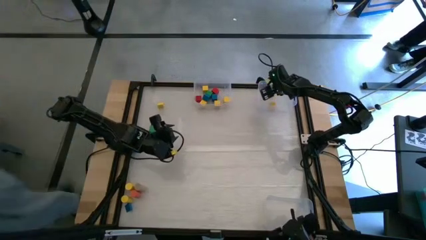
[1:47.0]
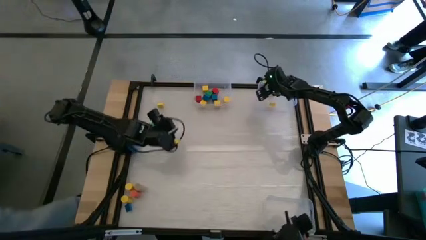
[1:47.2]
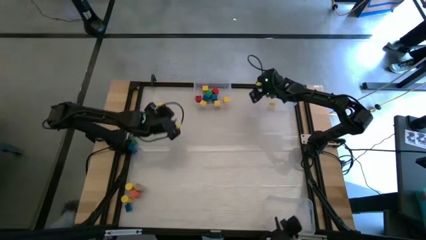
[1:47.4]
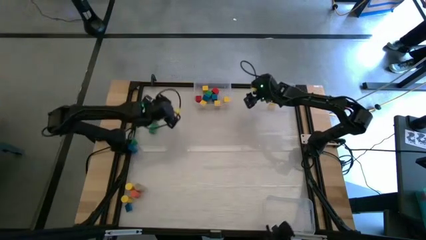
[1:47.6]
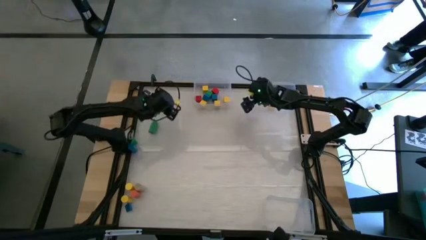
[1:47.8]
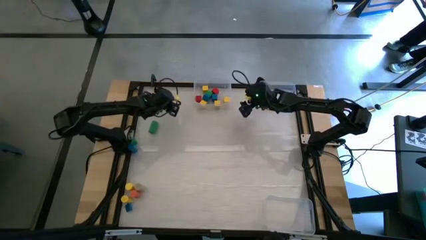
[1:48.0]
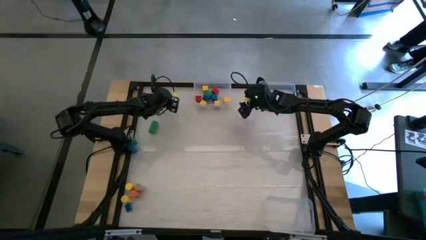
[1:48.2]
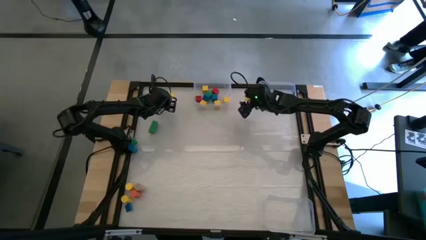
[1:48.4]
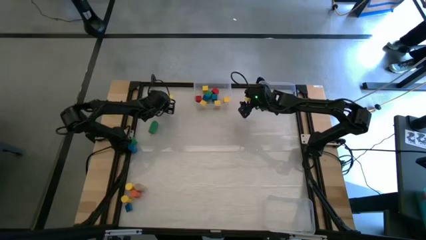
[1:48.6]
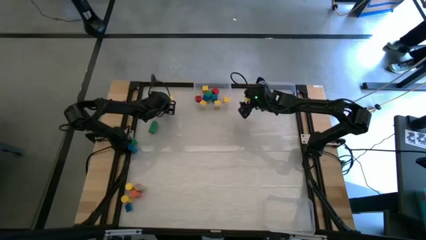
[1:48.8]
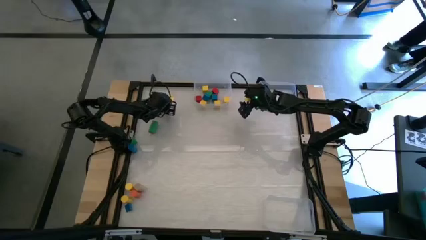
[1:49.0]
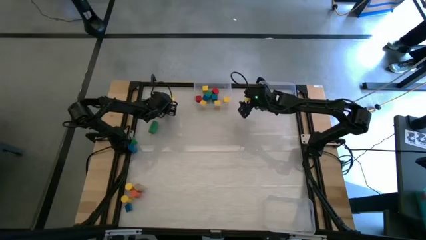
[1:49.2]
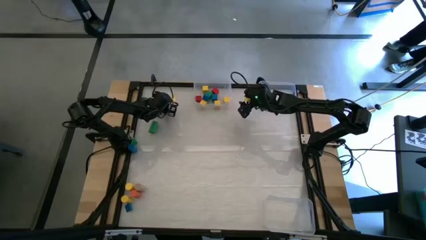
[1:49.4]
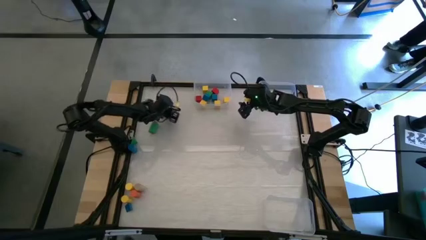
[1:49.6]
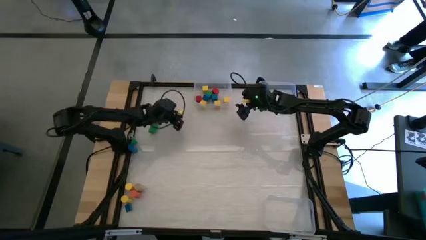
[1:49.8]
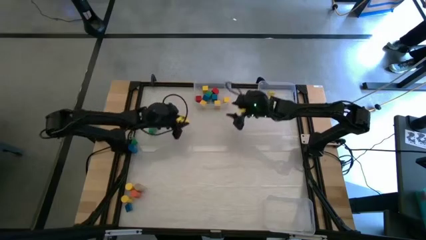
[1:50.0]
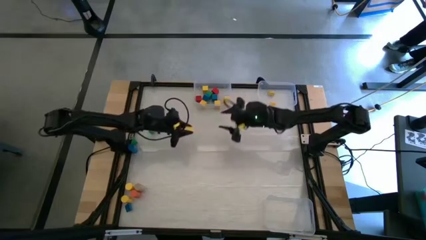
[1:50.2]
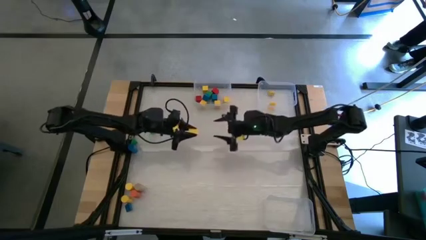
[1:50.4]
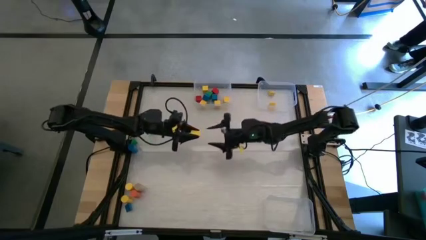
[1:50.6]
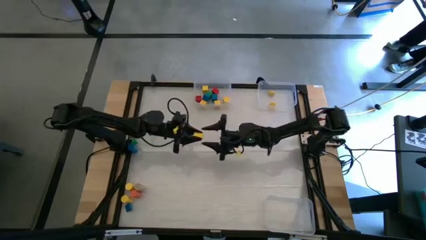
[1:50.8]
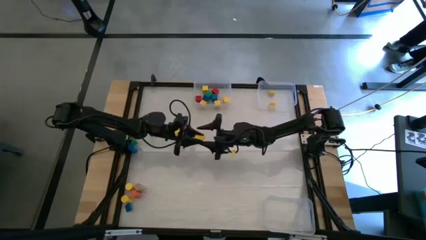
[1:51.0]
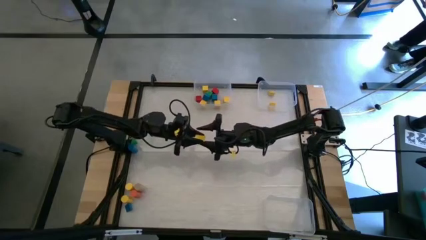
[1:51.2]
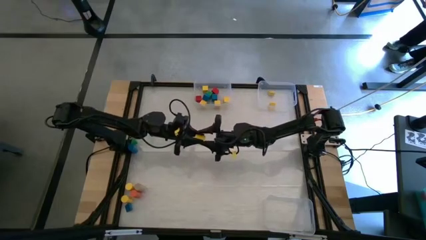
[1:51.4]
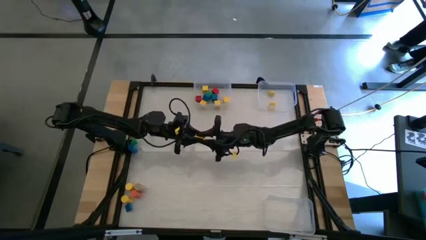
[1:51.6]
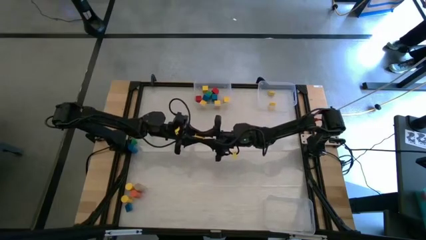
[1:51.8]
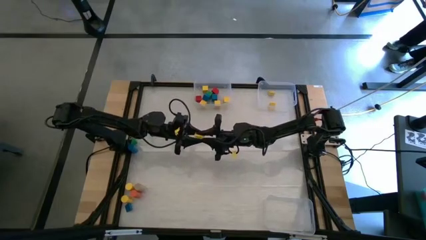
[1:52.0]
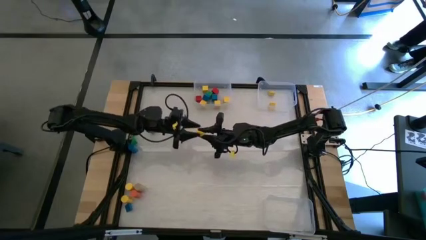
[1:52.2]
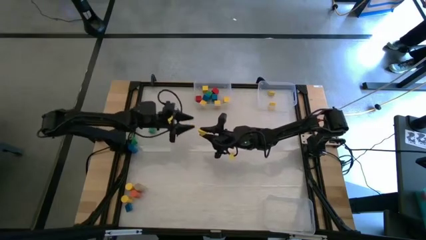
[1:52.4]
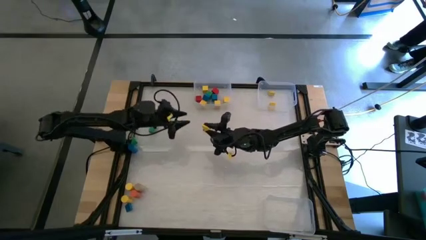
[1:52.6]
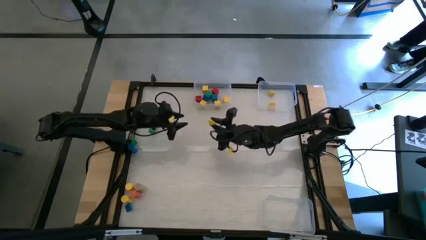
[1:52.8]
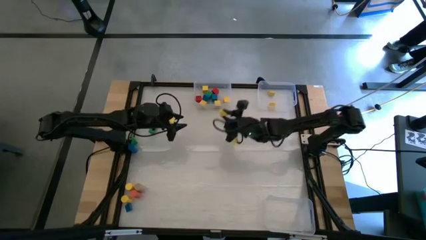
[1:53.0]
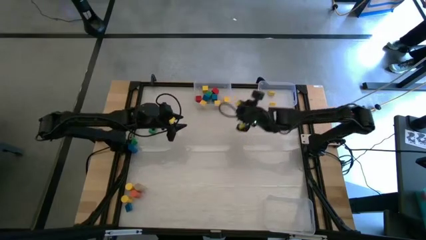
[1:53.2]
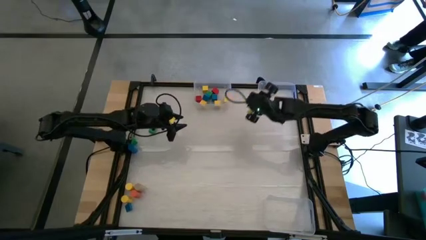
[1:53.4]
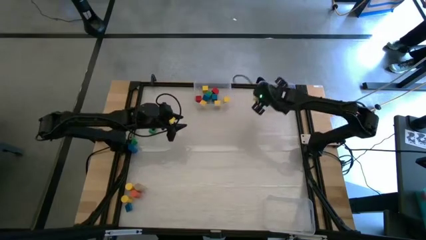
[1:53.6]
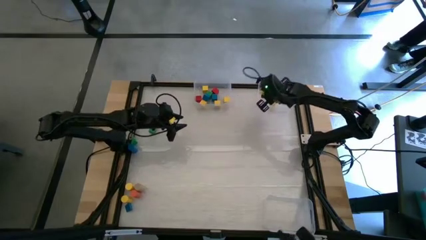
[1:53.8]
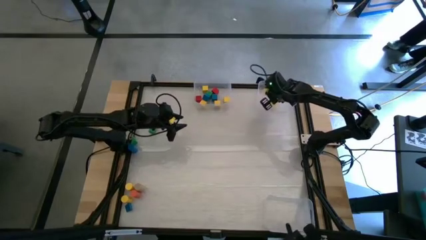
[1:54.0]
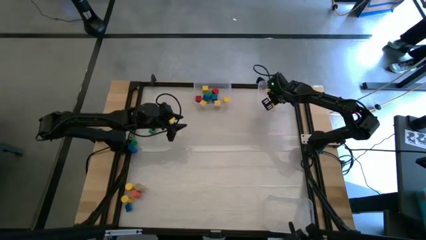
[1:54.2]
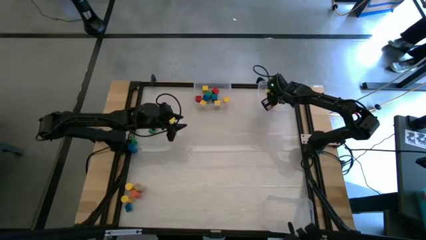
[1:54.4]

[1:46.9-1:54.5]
Task: Sort blocks by size
Put the triangle yellow block into the top right transparent bin

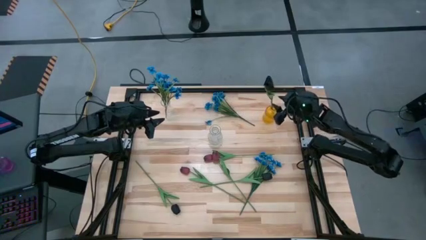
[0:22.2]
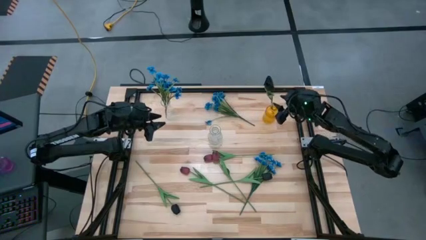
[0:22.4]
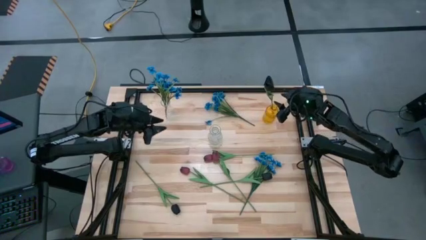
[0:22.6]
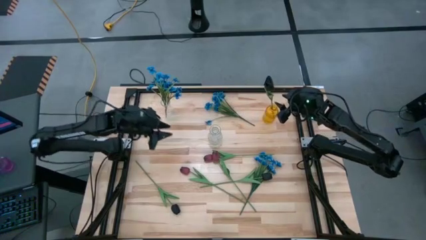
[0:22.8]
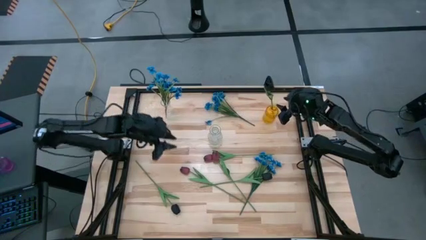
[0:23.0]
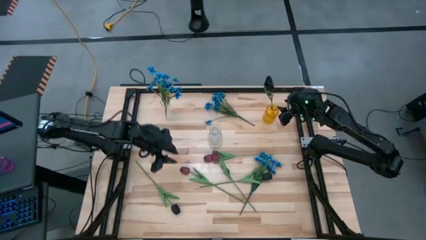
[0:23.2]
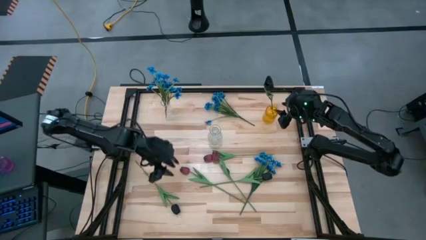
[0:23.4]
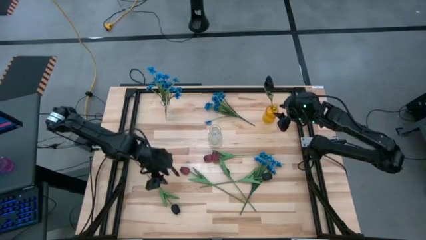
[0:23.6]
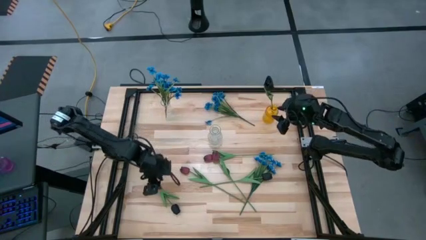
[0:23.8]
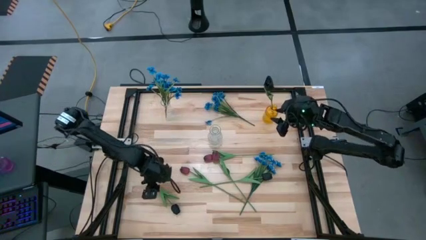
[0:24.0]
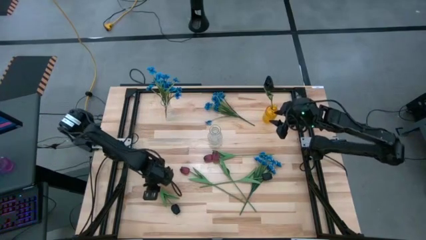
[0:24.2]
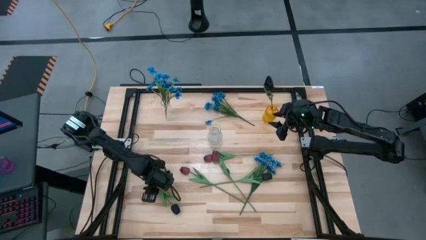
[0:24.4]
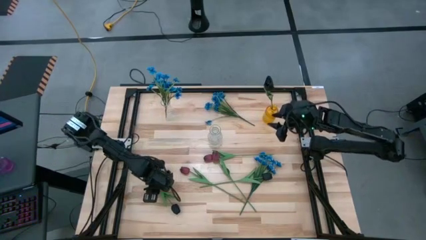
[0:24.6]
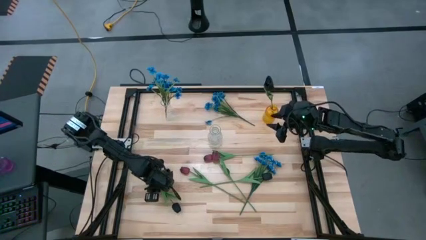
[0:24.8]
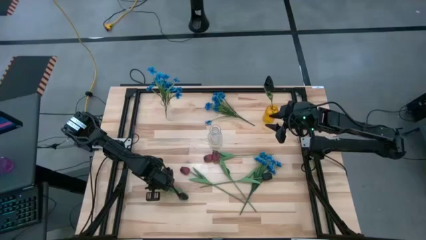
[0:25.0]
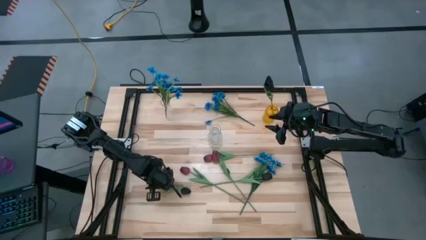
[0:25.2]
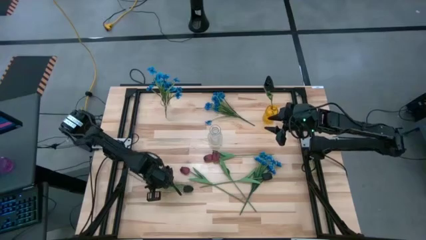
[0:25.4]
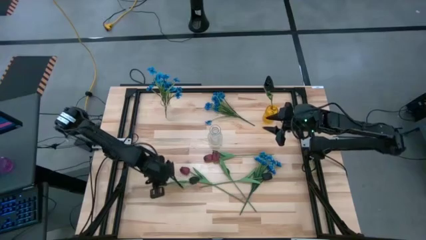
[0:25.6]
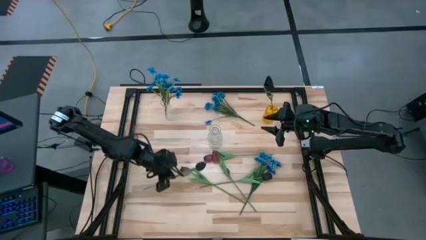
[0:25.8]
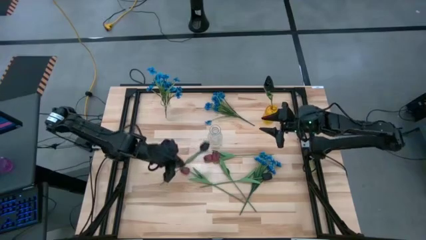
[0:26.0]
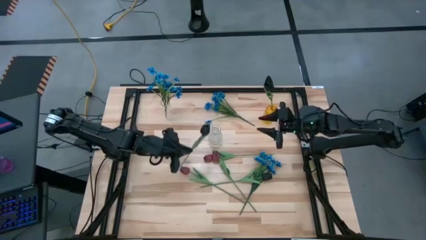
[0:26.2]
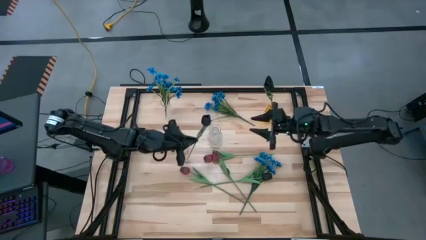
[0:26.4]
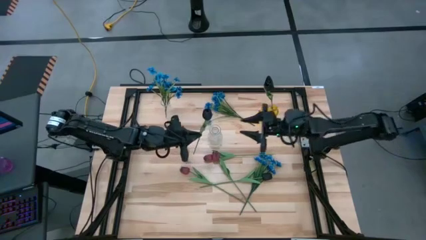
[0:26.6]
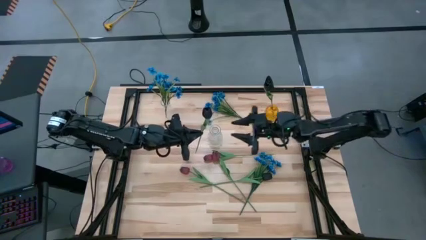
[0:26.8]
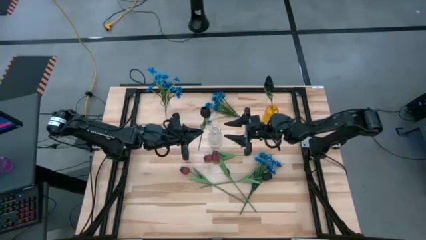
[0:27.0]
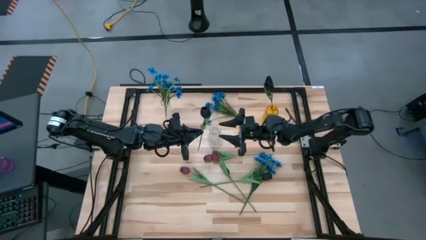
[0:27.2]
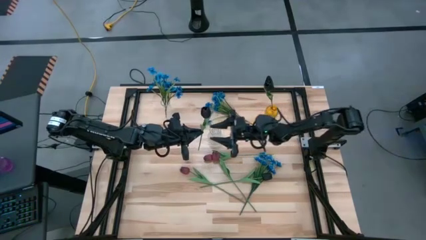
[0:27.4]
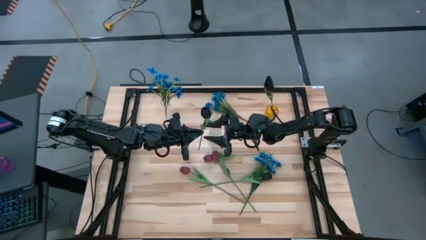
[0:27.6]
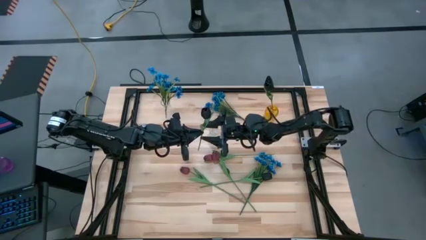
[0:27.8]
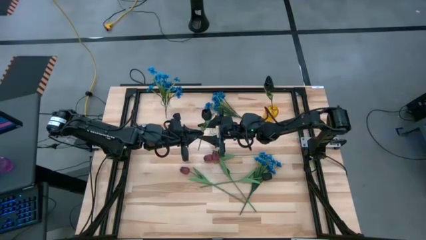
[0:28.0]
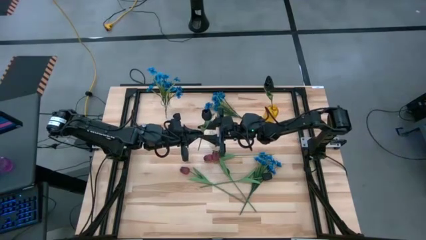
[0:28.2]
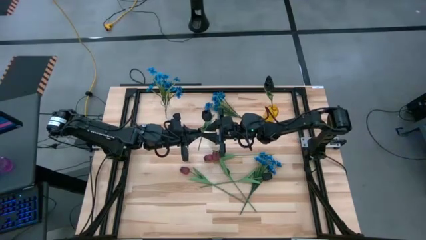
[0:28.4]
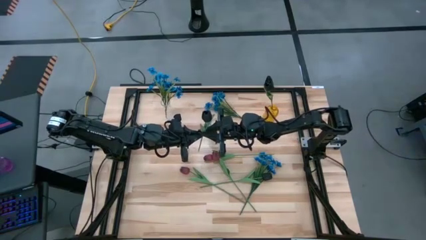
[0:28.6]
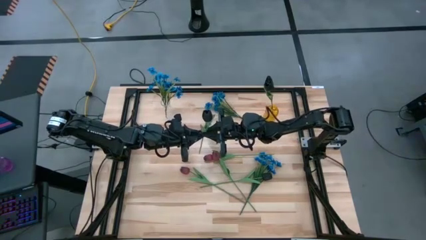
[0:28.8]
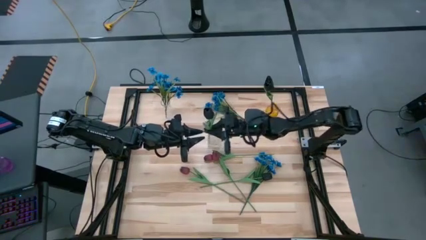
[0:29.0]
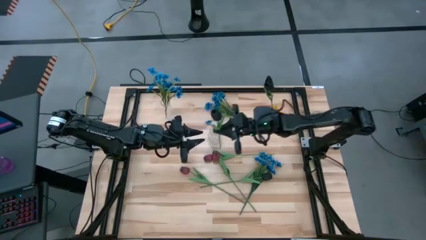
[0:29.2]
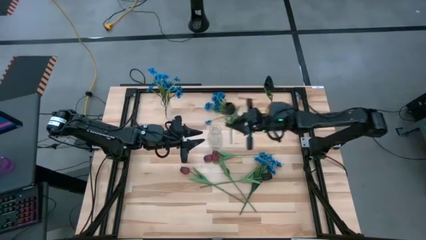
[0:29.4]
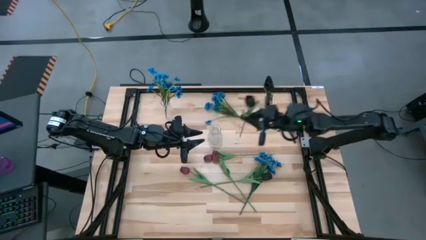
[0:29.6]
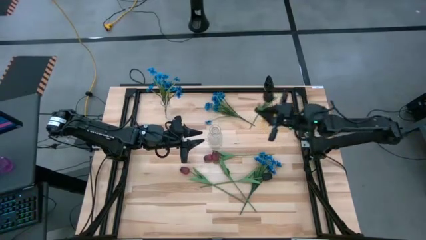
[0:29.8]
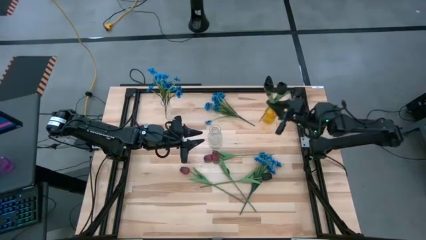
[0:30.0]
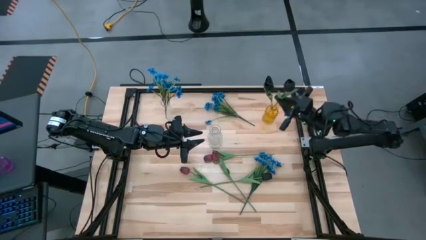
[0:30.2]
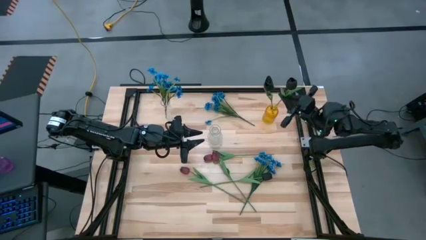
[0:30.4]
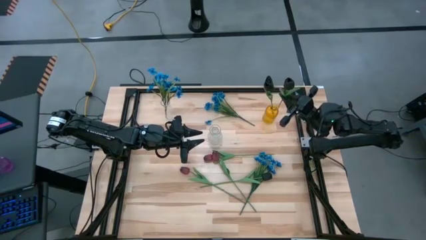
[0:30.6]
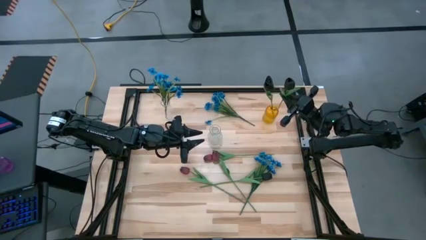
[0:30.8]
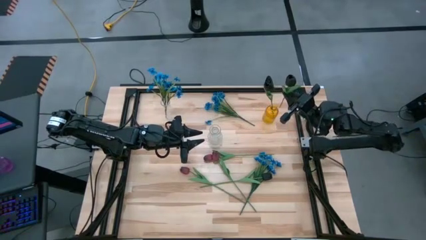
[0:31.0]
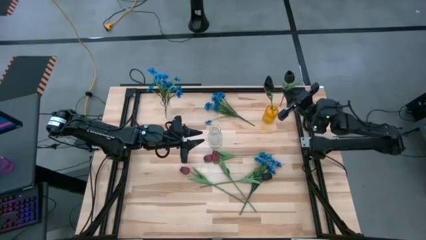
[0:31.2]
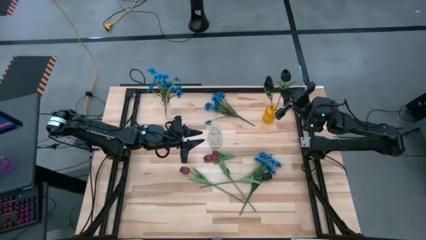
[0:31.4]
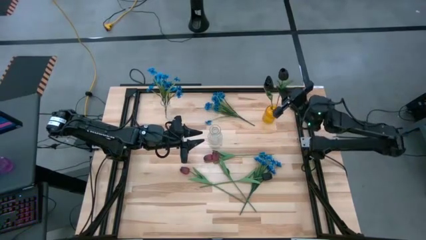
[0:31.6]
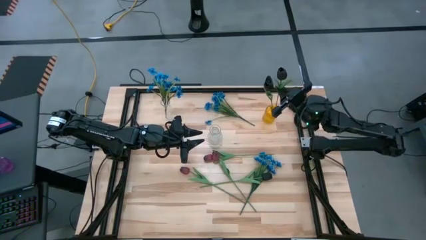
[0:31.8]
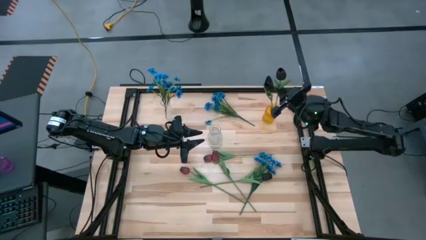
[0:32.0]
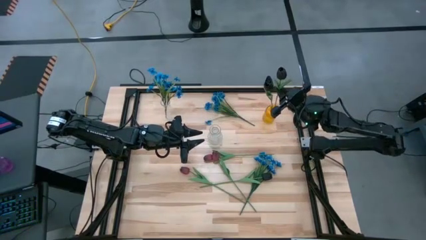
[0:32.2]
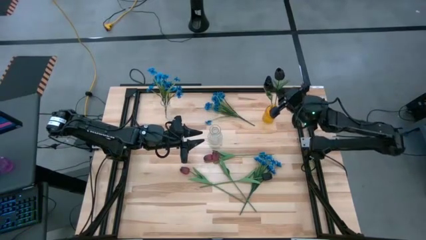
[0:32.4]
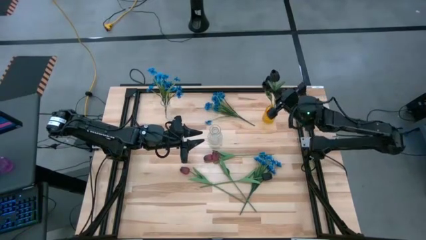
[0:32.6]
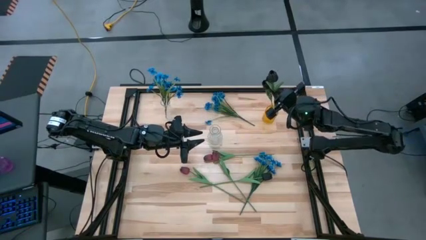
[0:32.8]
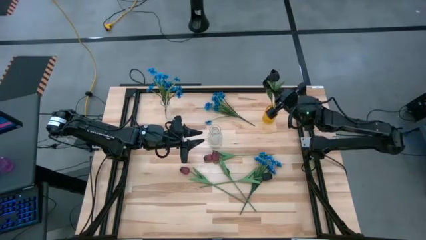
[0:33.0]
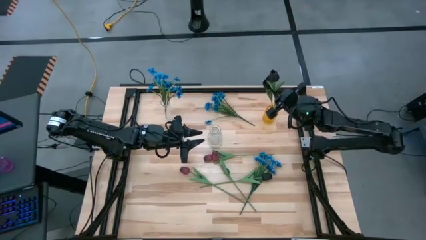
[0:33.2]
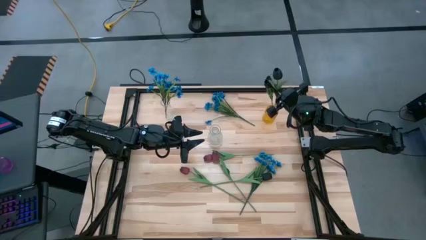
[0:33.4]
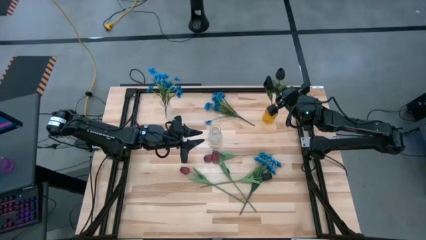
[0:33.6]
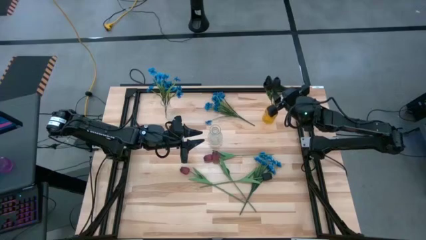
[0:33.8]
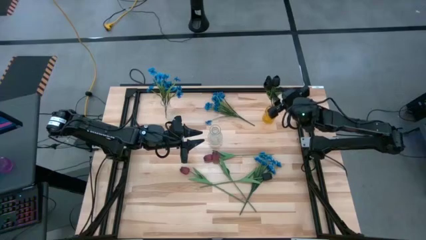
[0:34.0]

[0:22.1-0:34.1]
Task: Sort flowers into vase by color
Put the left black flower into the yellow vase
